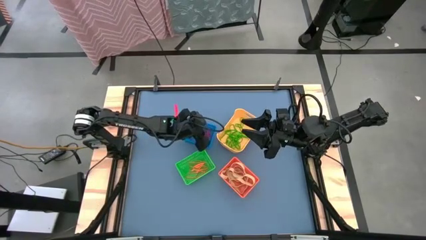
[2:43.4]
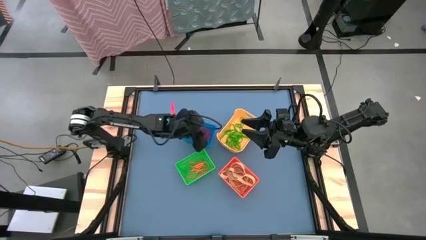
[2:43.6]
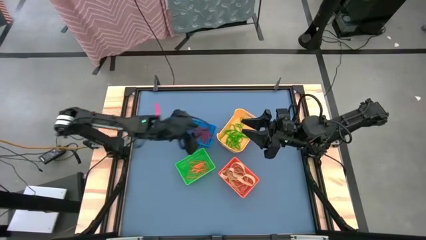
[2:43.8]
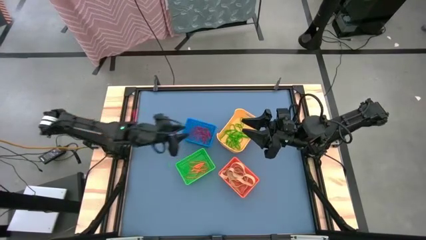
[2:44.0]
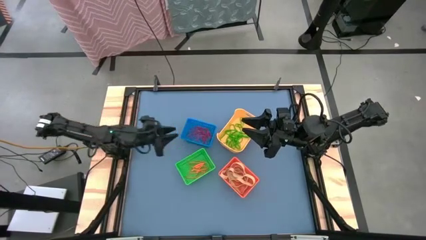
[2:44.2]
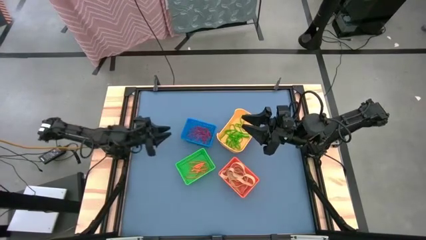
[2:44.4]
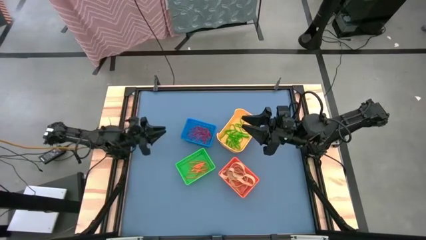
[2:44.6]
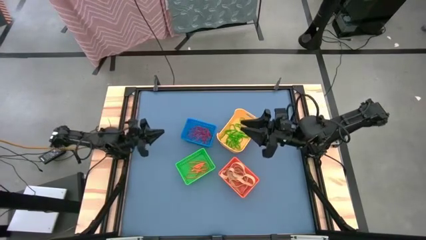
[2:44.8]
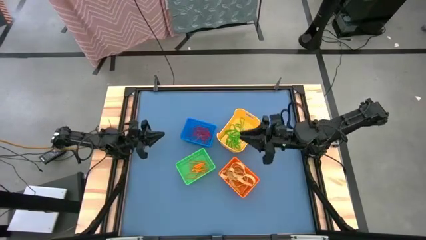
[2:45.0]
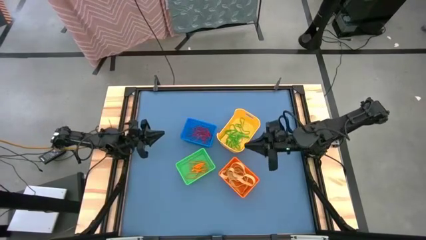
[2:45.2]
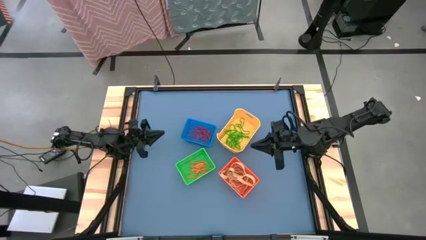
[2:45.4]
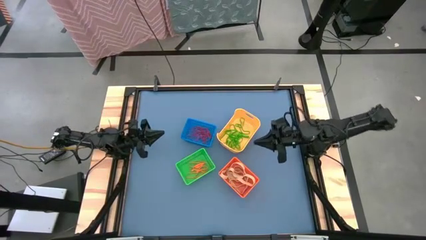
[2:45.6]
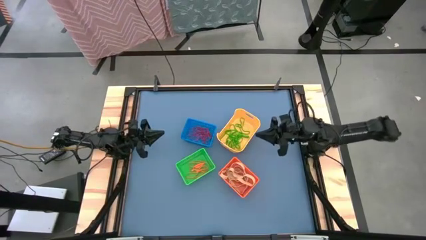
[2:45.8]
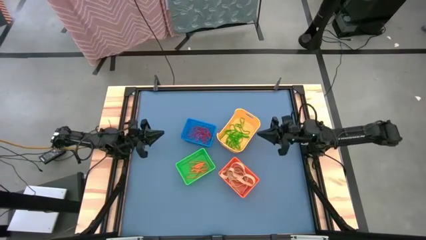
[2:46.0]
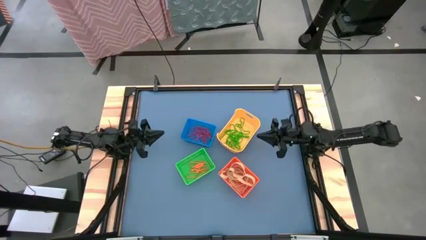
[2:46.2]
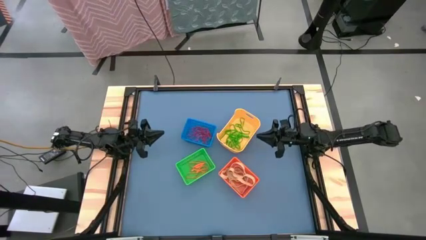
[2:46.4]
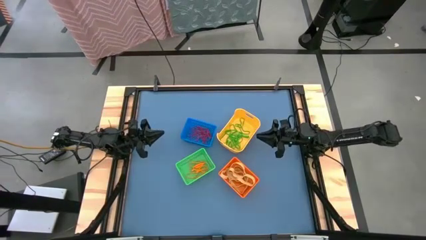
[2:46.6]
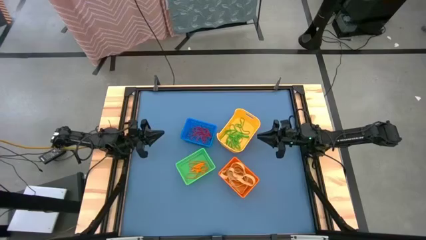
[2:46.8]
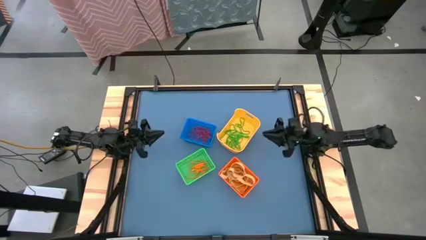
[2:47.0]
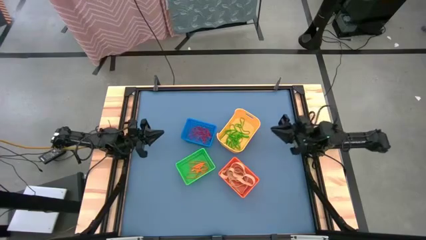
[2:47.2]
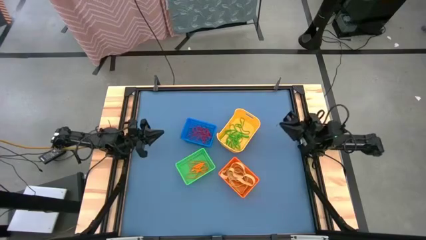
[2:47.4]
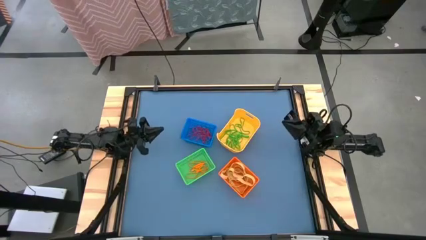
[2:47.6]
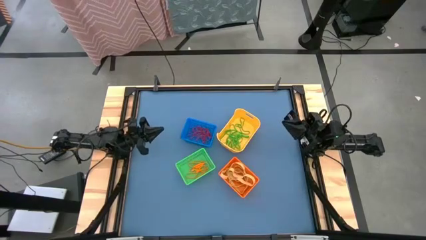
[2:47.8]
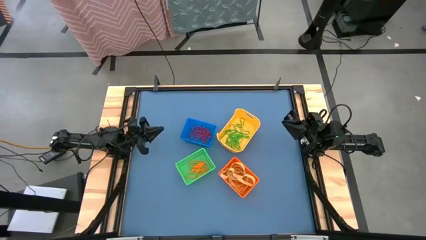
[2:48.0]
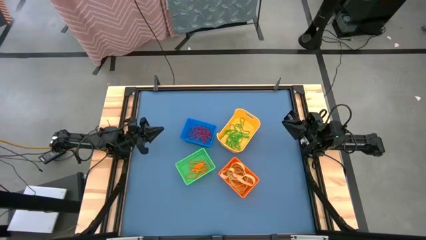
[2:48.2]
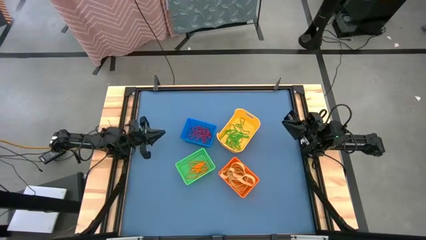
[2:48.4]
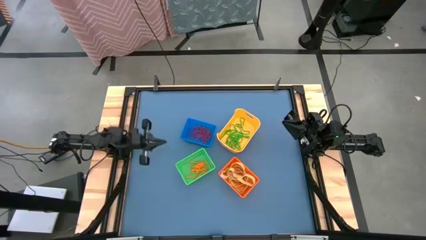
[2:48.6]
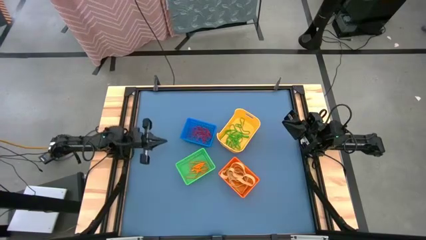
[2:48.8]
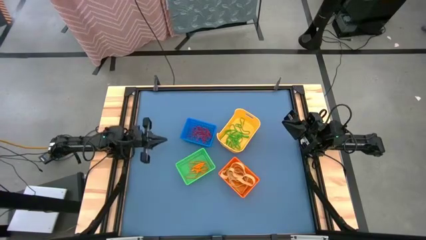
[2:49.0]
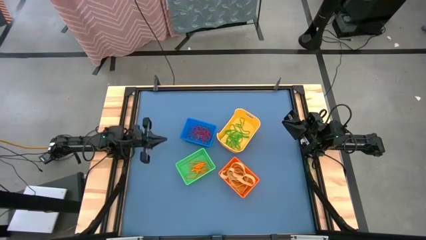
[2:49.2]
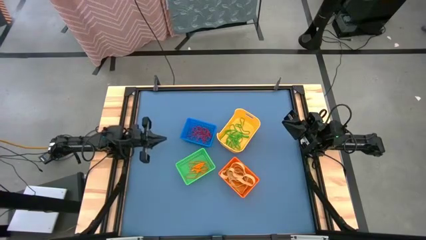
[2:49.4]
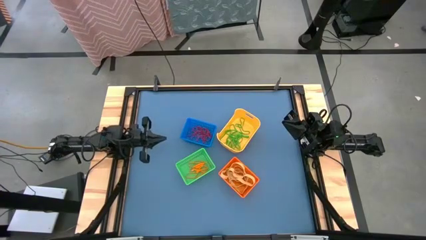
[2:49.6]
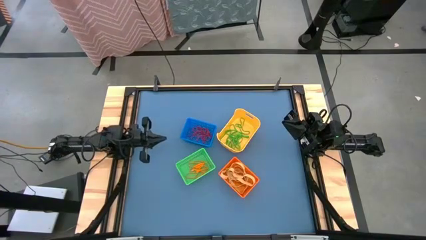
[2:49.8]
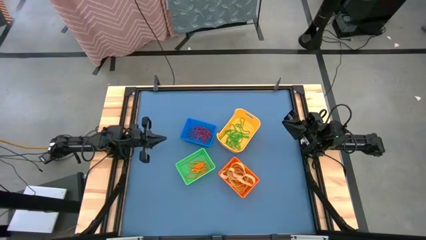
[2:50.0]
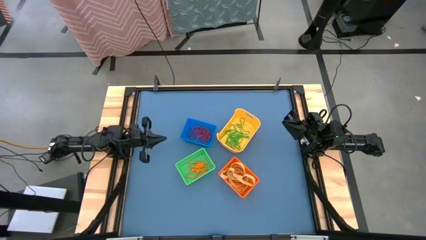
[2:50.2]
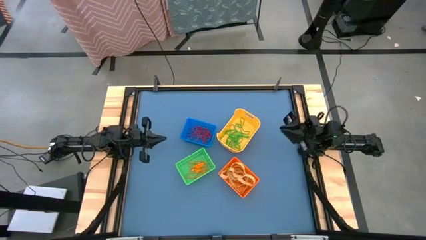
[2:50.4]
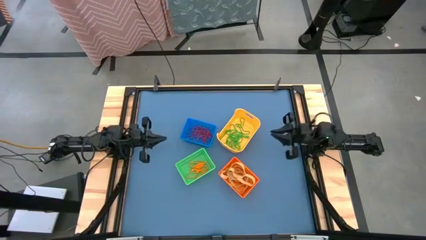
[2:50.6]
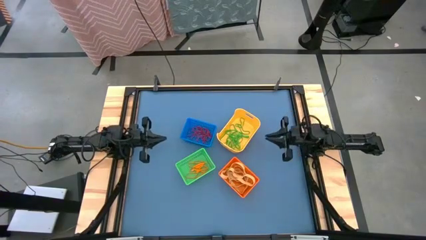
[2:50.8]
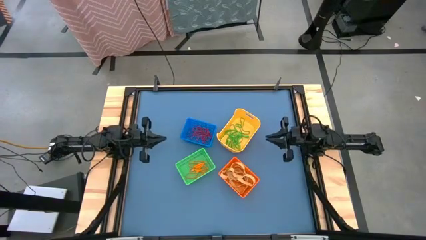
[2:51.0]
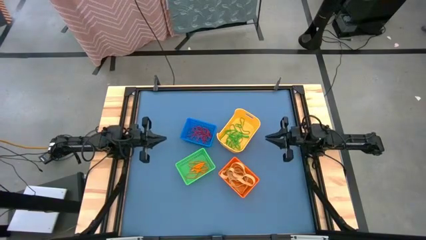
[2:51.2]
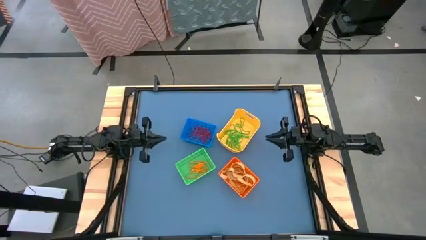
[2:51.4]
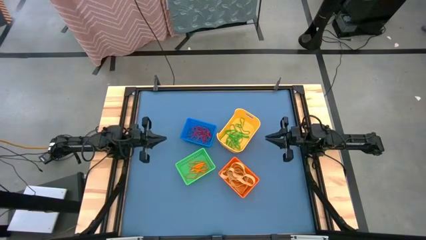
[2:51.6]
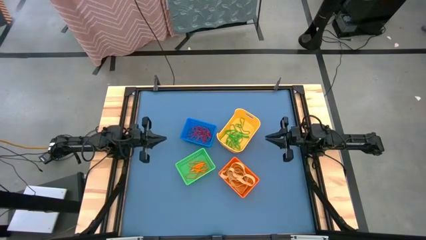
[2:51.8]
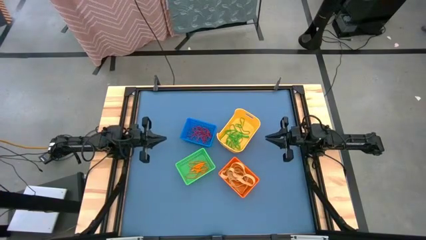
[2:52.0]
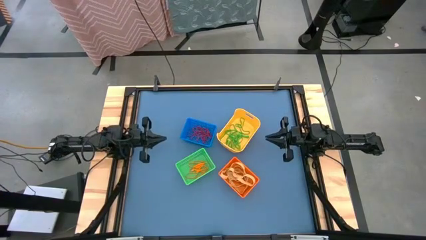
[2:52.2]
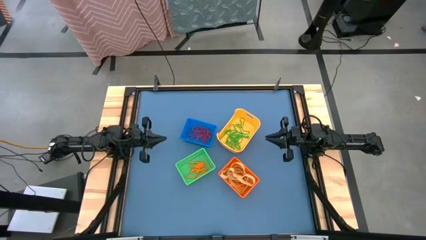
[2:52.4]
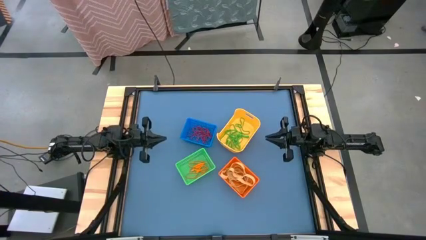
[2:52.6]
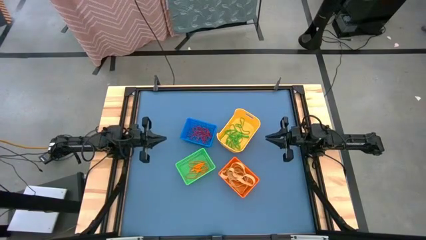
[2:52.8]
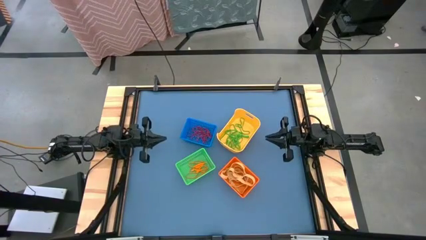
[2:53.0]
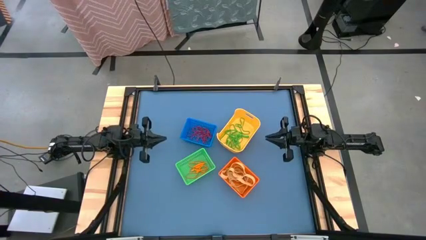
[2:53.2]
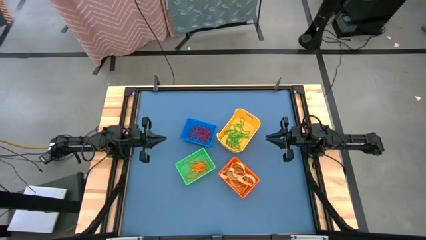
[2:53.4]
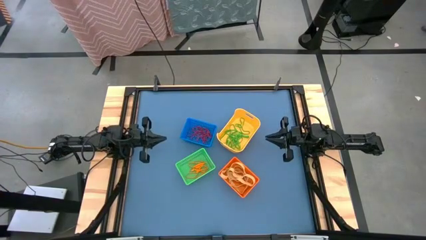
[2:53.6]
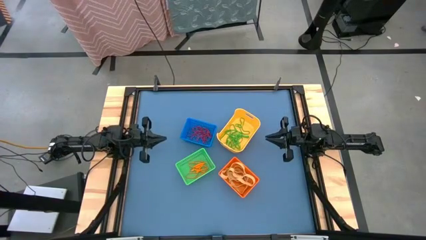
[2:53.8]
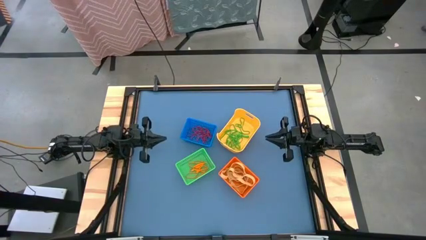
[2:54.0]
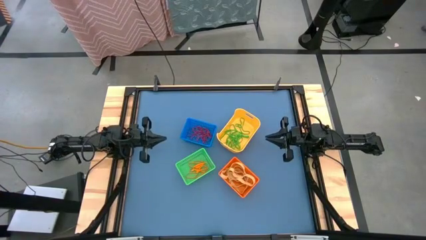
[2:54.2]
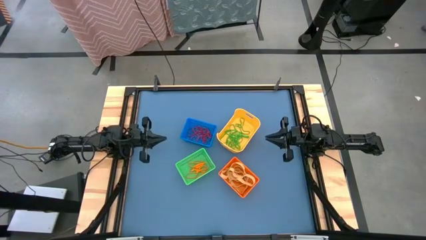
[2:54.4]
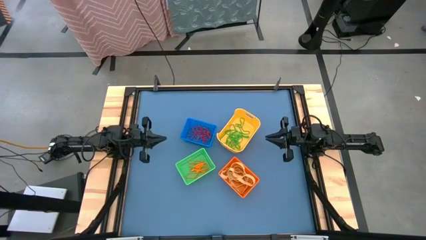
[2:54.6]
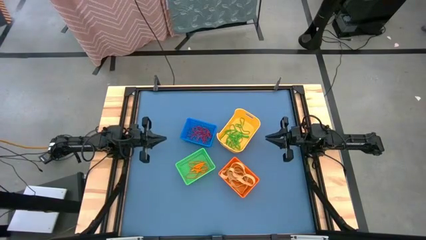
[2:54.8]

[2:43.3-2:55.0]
Task: Sort rubber bands into baskets
Return to Home Position
